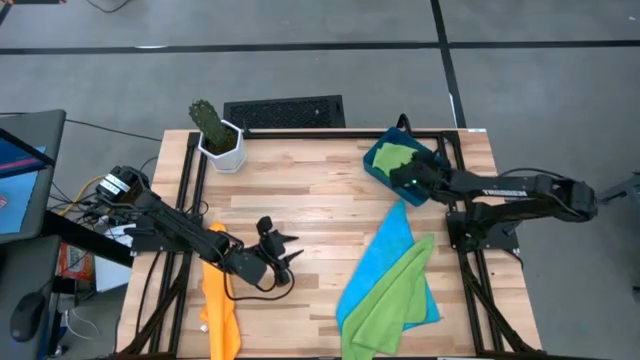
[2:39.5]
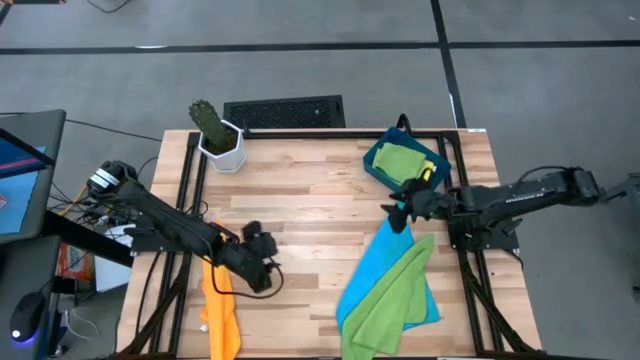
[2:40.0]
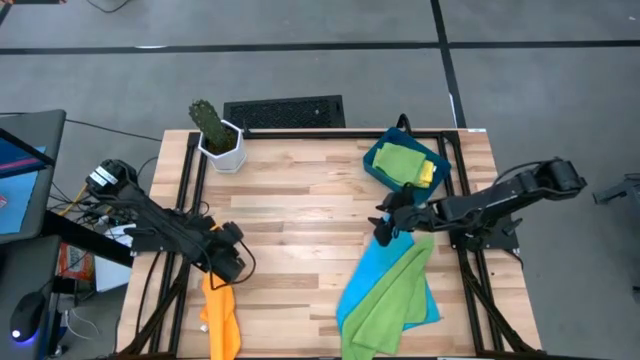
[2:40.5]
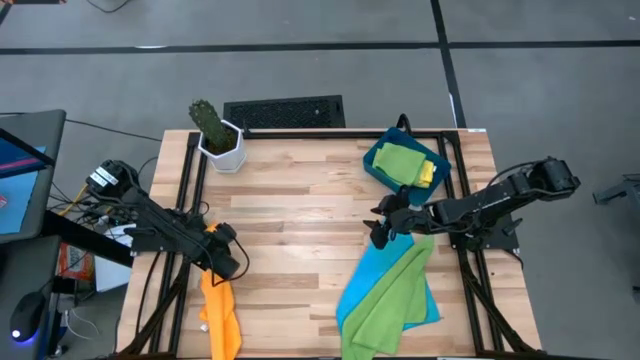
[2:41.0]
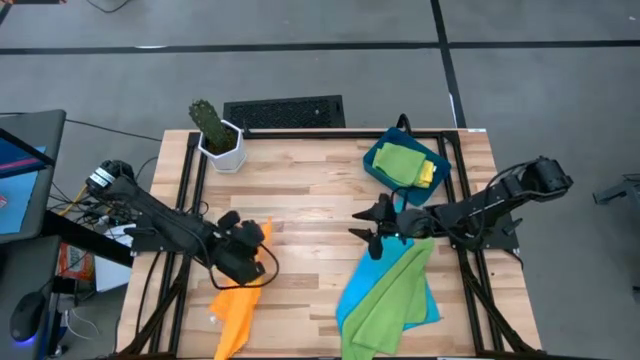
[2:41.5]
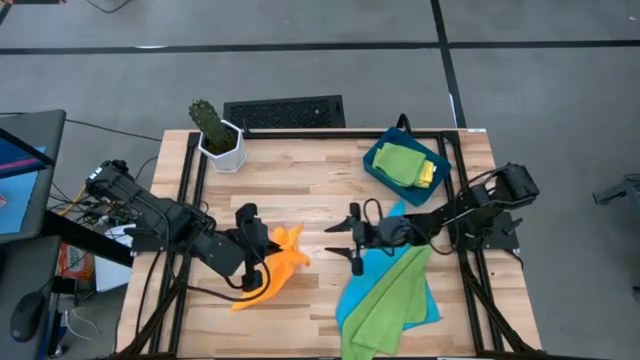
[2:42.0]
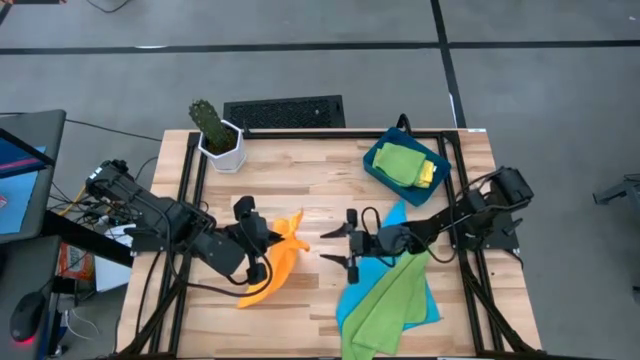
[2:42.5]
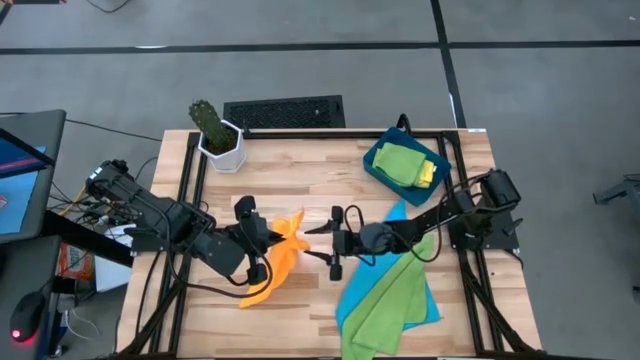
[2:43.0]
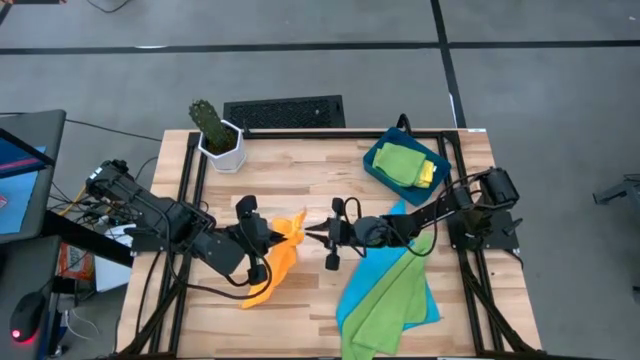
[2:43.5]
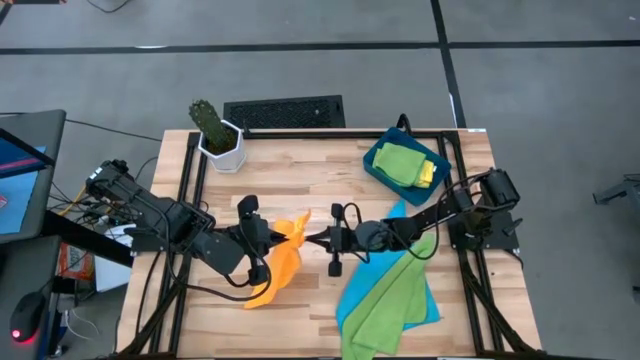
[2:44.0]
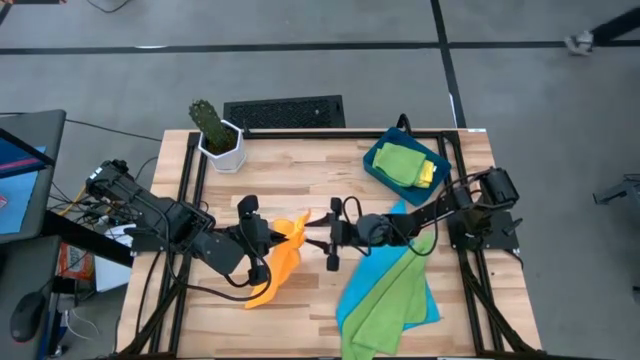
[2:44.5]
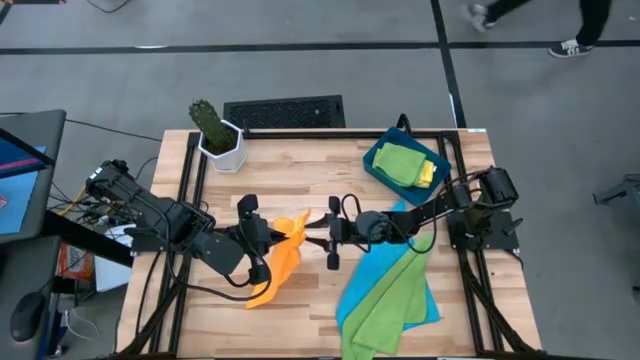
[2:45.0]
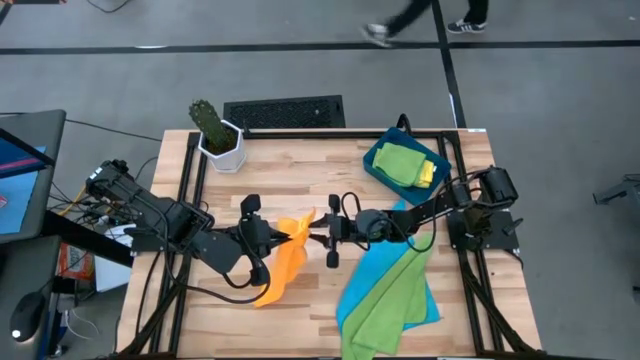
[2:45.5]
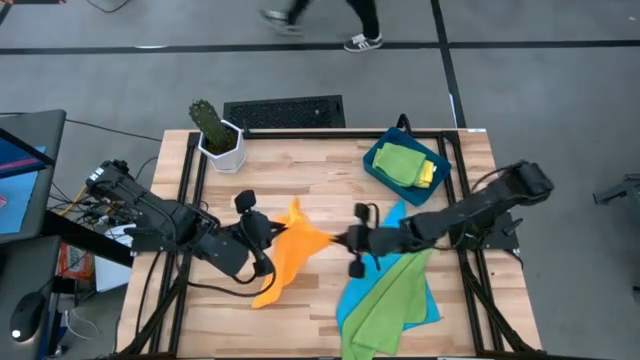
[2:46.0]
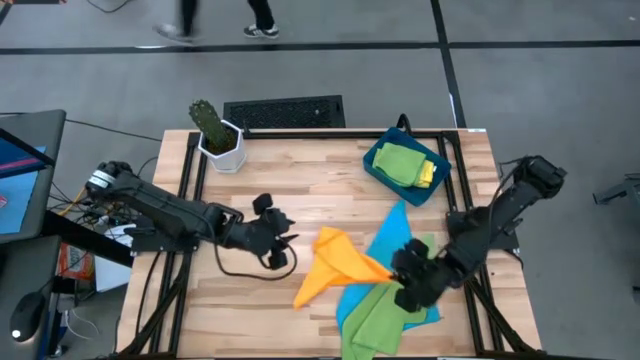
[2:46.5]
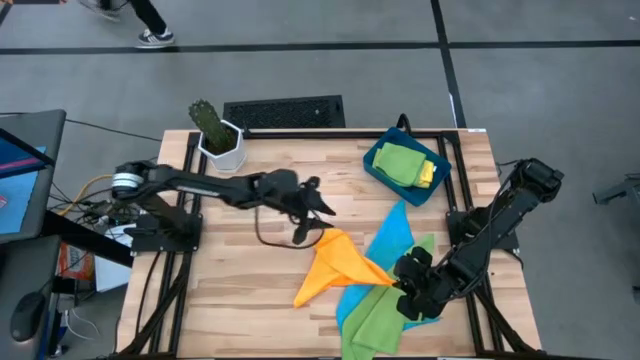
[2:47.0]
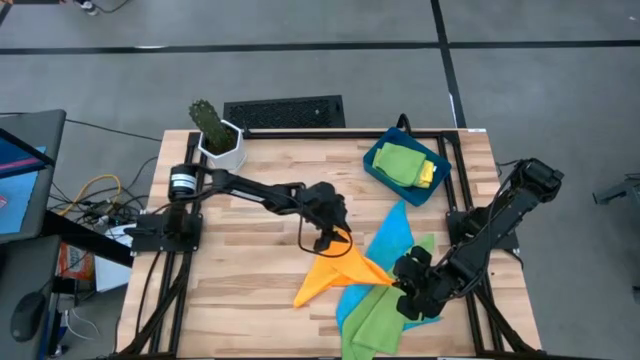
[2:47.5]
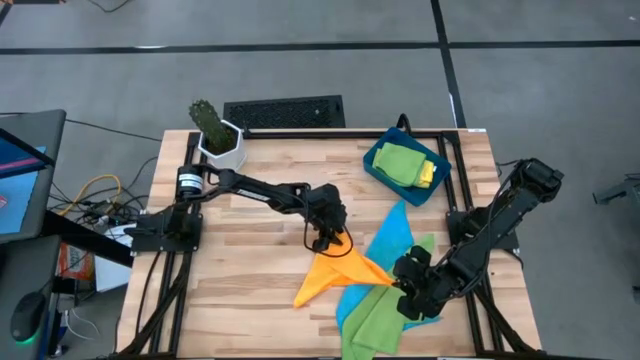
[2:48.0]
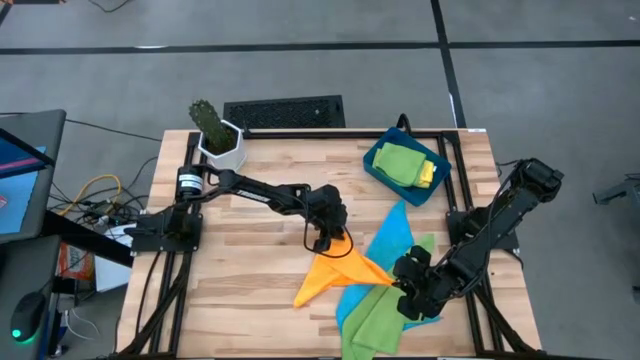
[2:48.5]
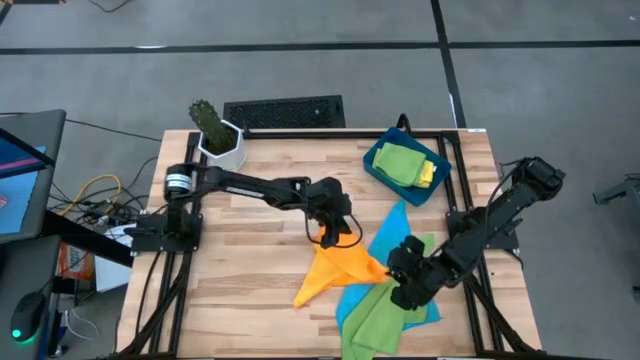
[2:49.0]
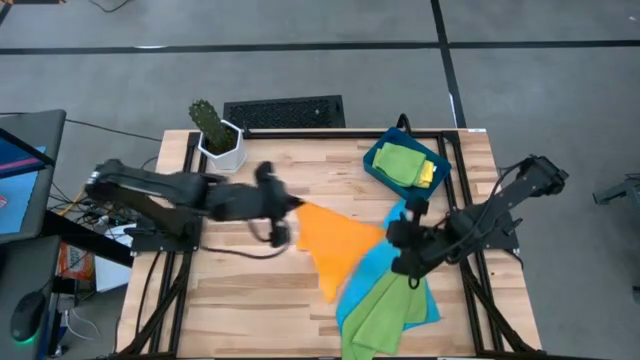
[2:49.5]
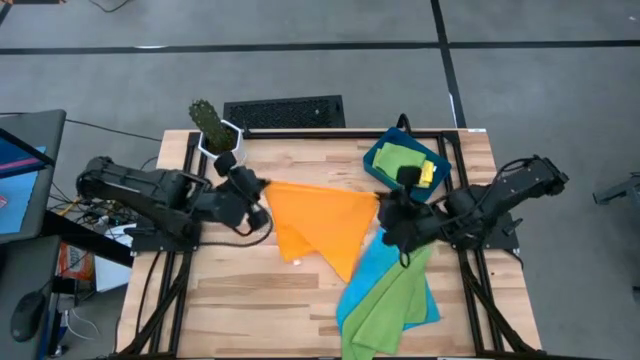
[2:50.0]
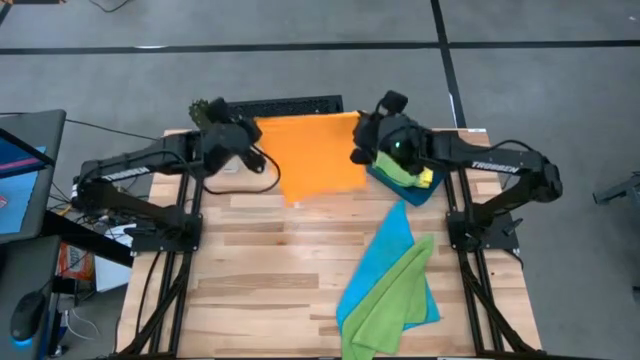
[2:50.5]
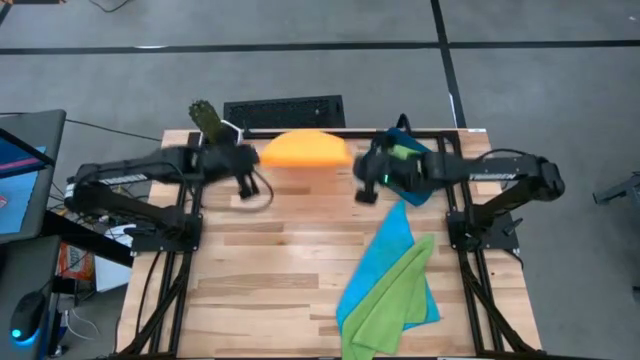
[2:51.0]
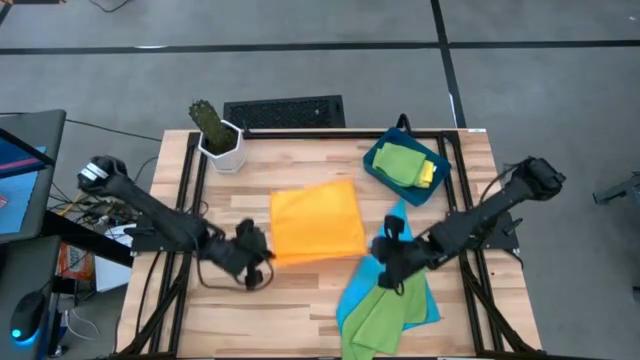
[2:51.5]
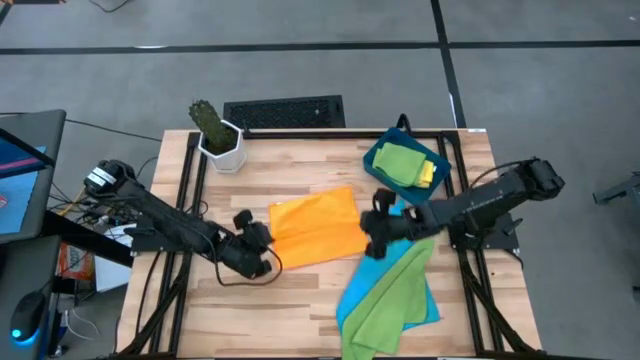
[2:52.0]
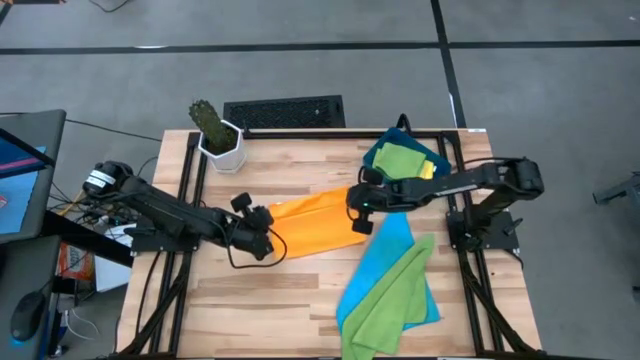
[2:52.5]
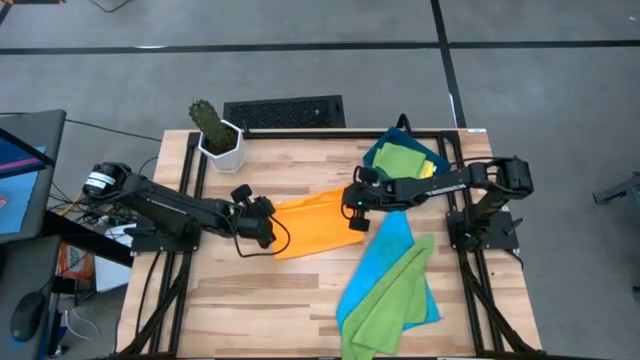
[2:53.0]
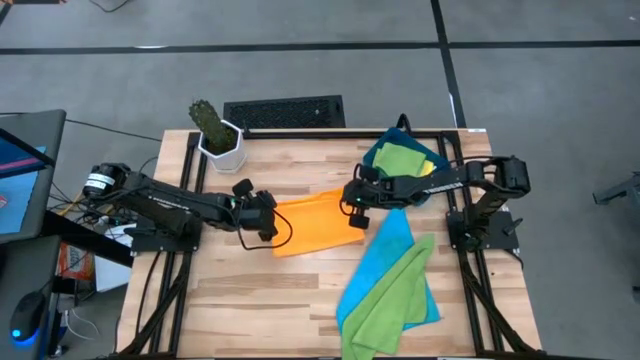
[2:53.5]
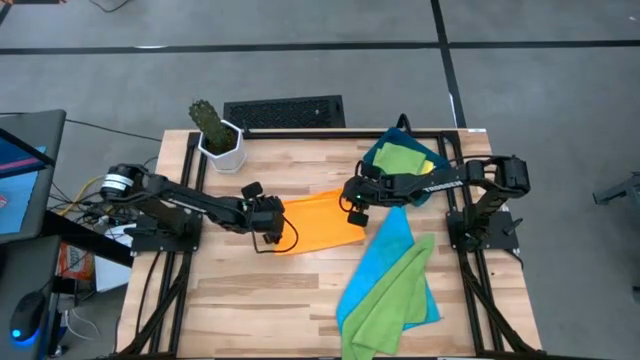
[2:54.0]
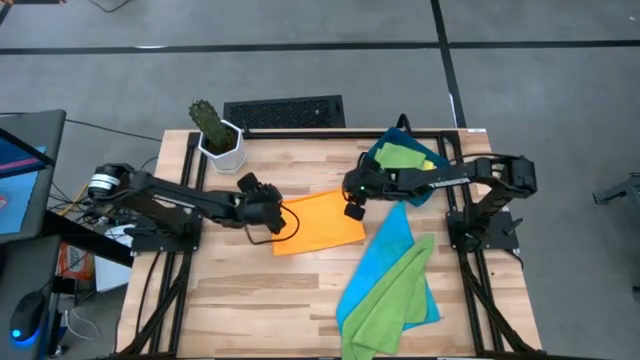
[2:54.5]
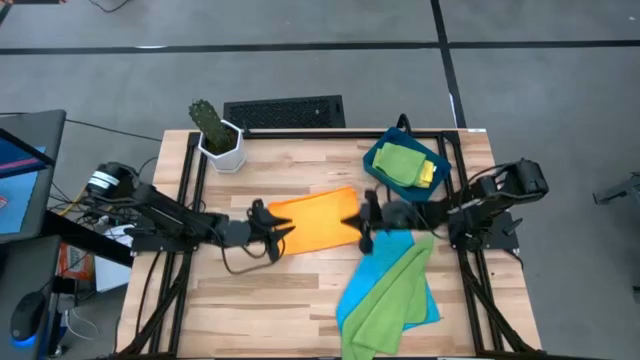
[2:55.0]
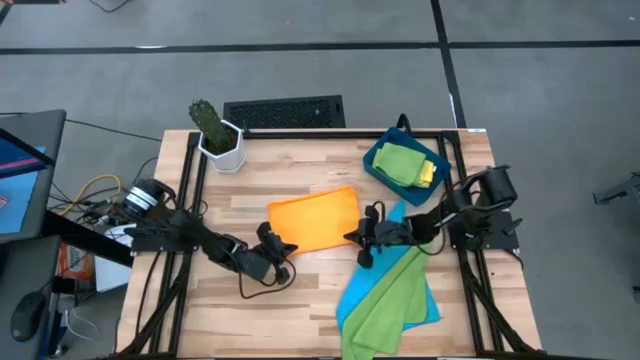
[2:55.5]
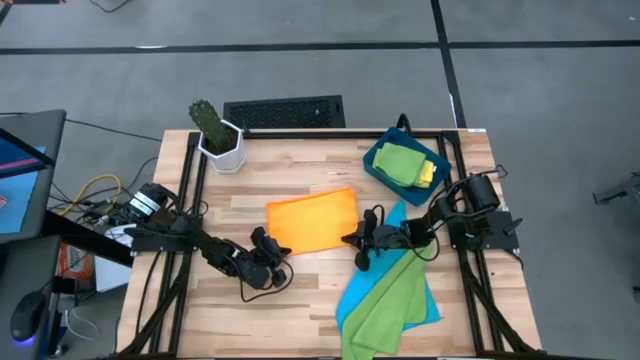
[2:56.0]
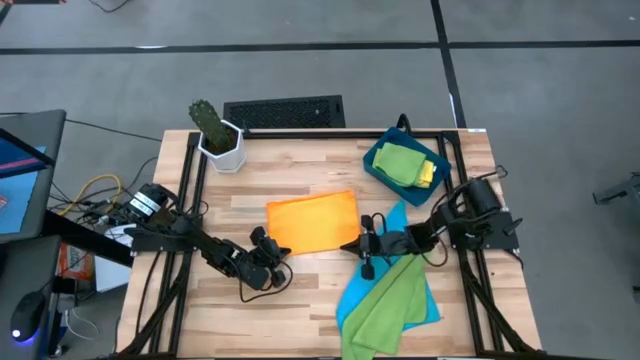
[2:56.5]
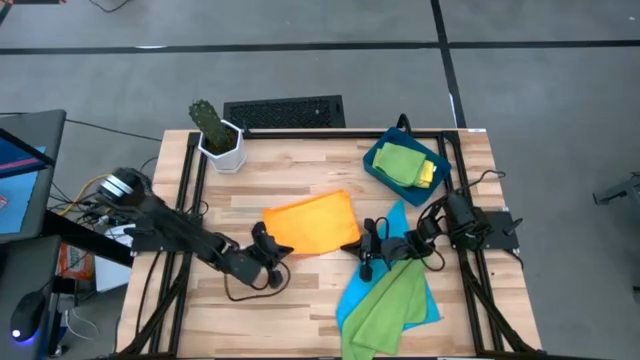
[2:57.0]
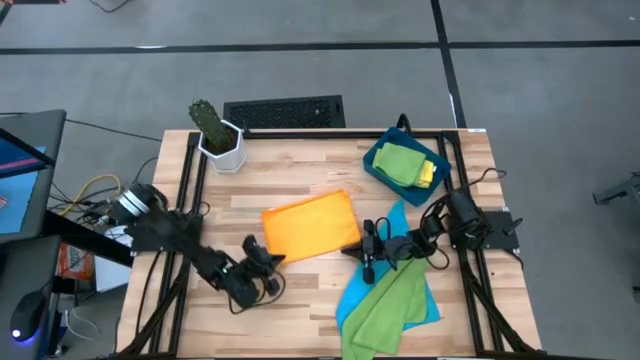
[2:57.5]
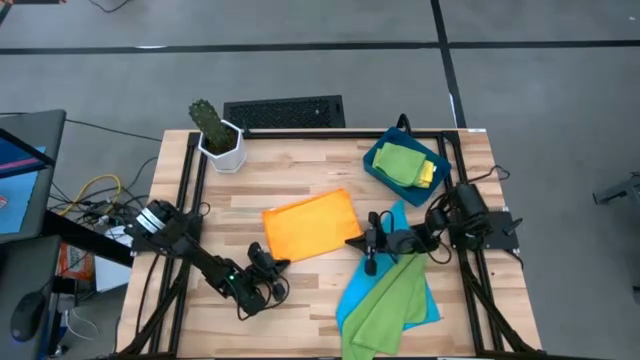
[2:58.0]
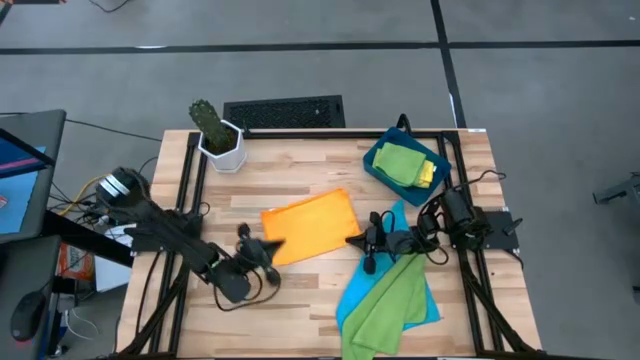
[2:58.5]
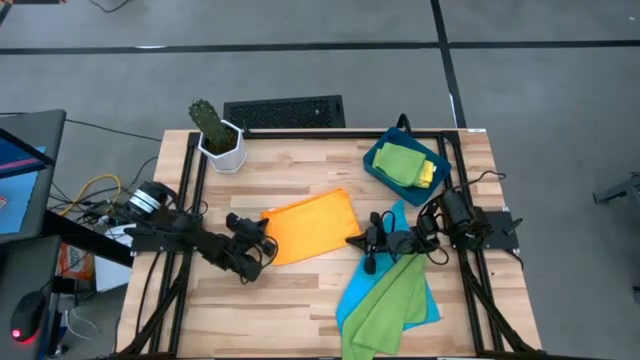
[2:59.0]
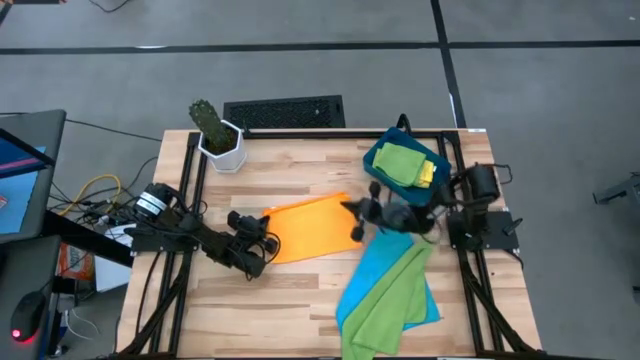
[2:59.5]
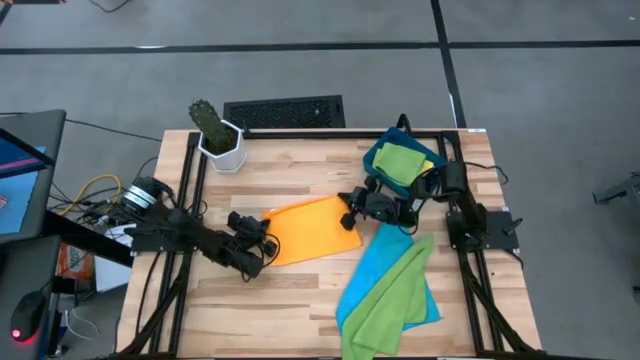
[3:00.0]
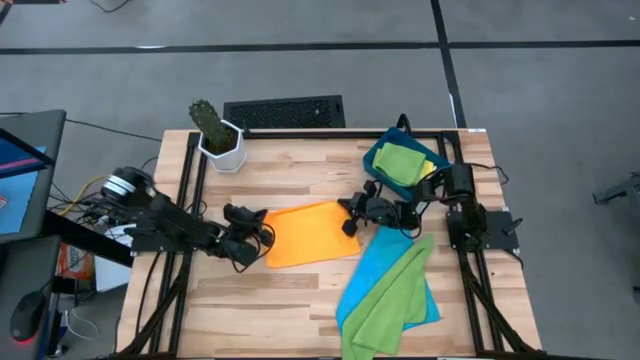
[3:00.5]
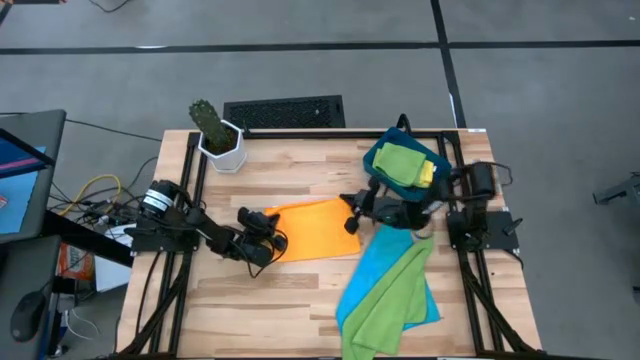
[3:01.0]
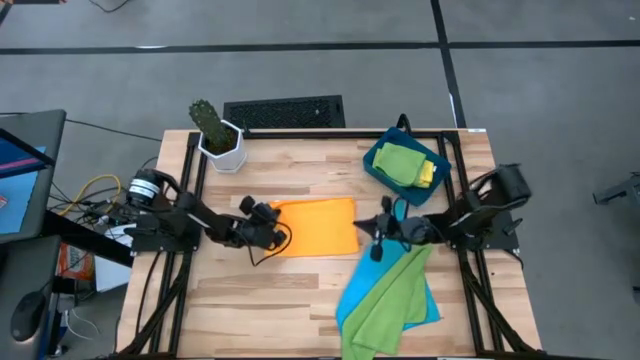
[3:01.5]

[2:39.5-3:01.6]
Task: Fold microfiber towels
Fold the orange microfiber cloth
